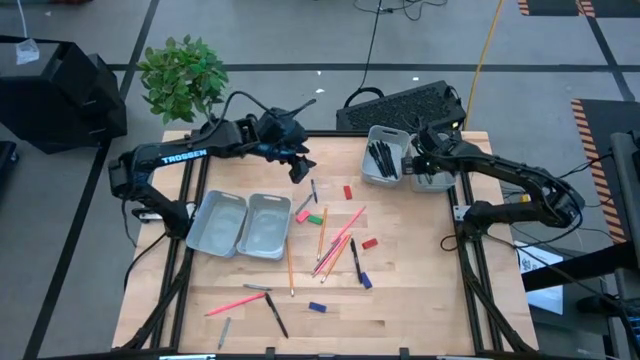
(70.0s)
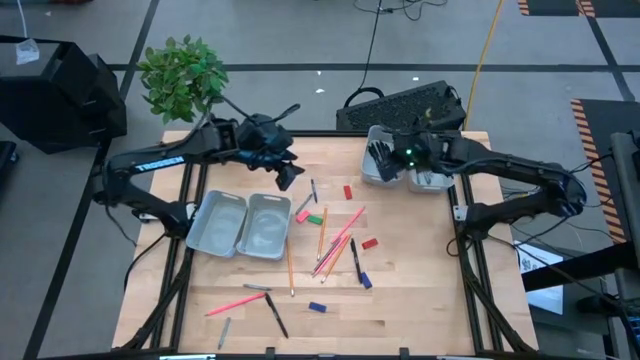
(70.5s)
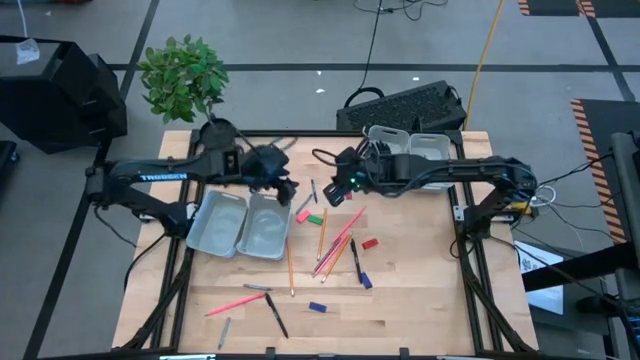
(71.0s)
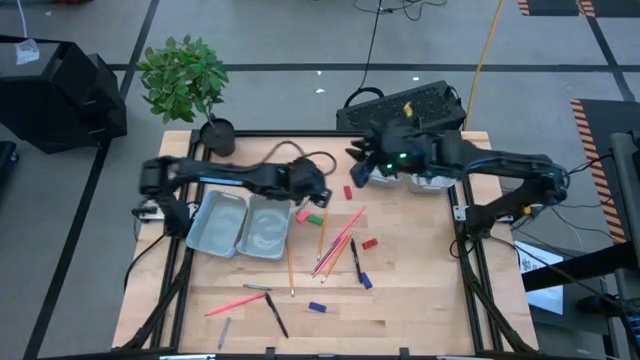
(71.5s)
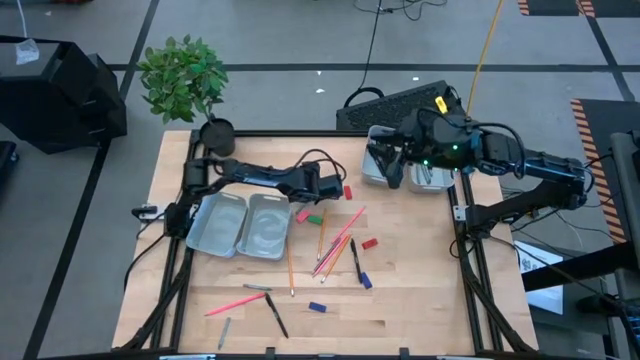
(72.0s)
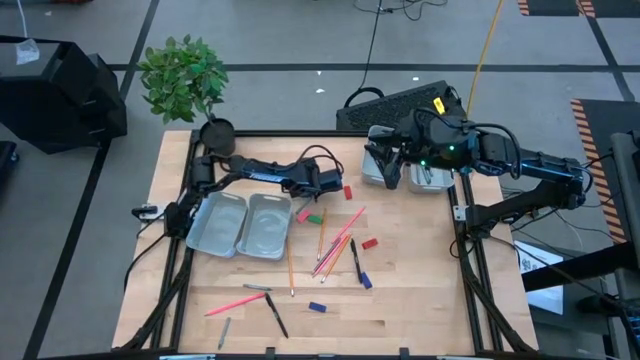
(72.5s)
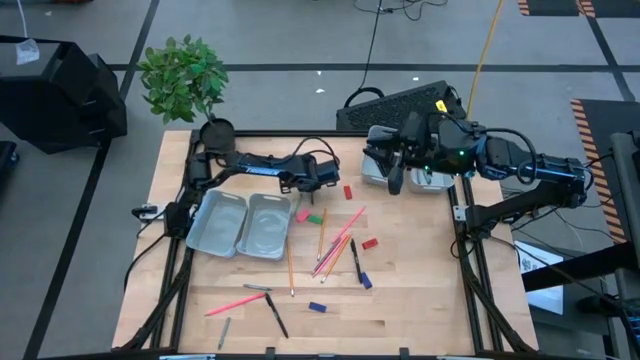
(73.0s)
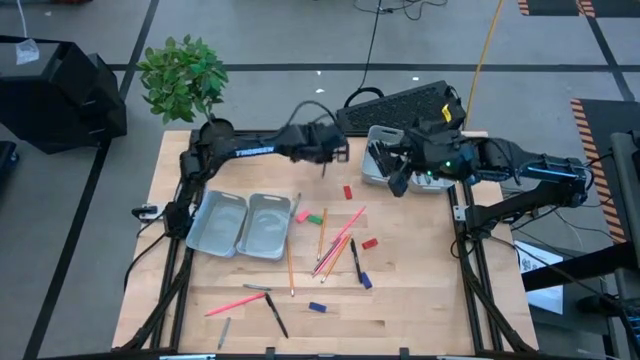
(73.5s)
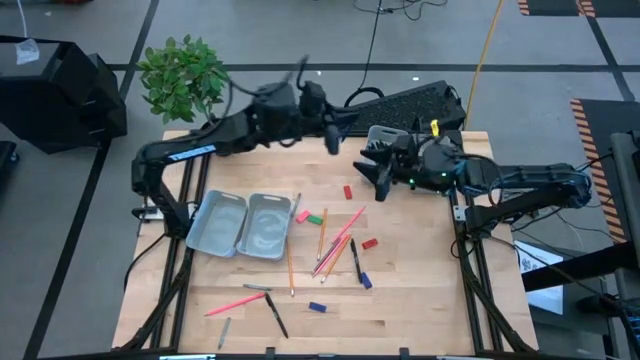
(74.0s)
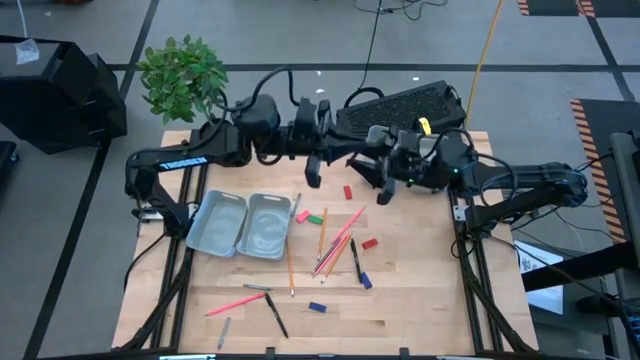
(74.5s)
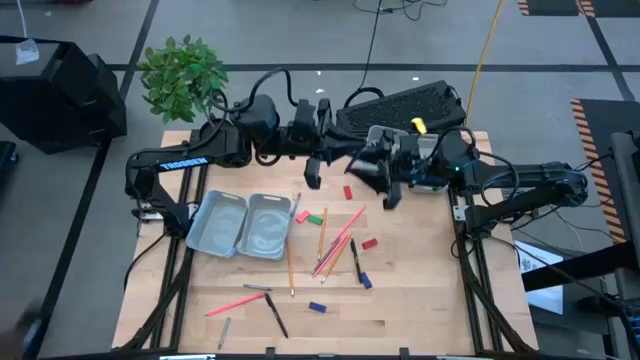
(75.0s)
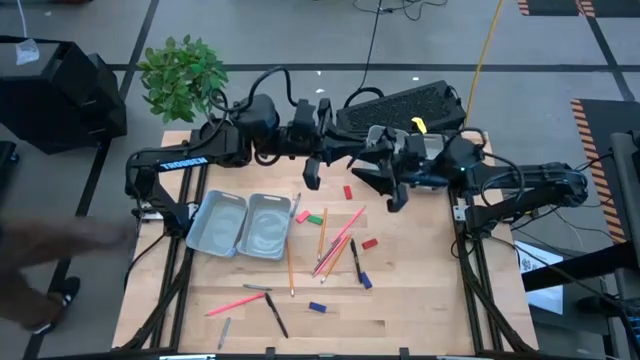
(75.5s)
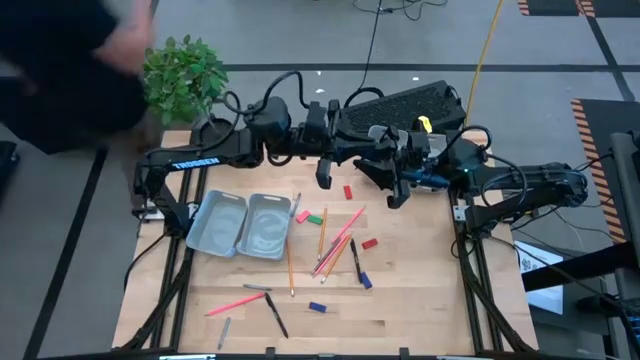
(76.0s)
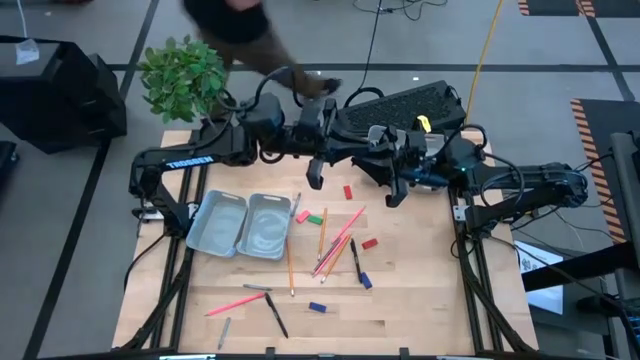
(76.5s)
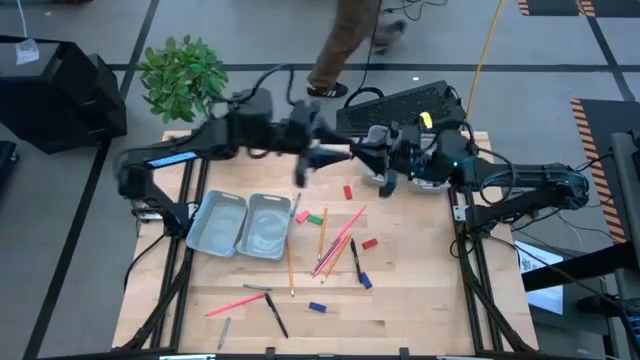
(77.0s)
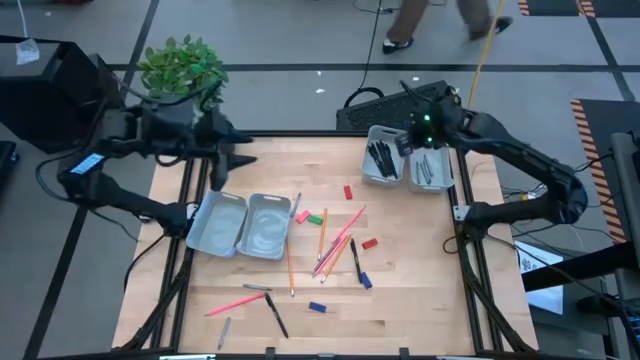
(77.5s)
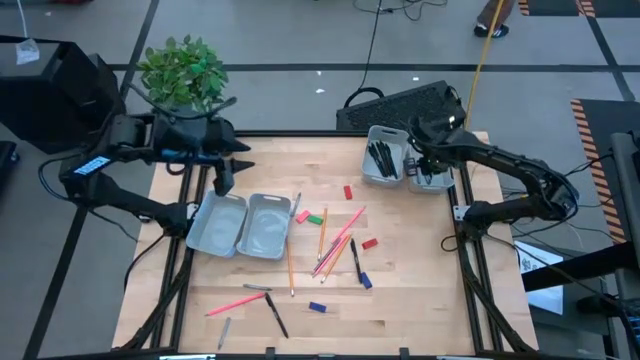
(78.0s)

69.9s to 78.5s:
Task: Sort crayons/erasers/pens/pencils in bins
Put the blue crayon into the top right gray bin

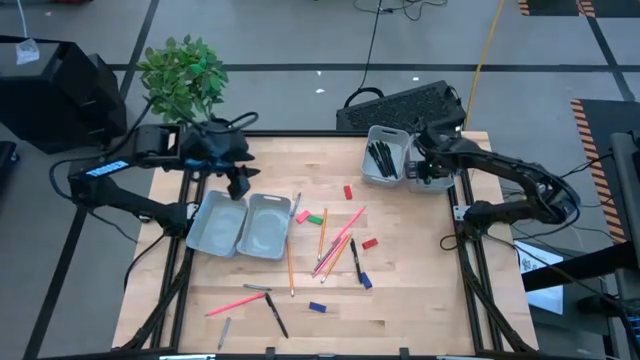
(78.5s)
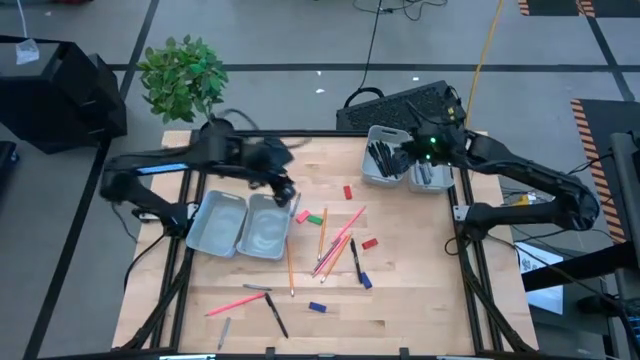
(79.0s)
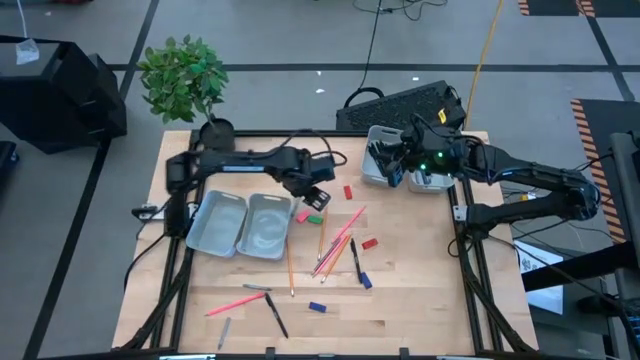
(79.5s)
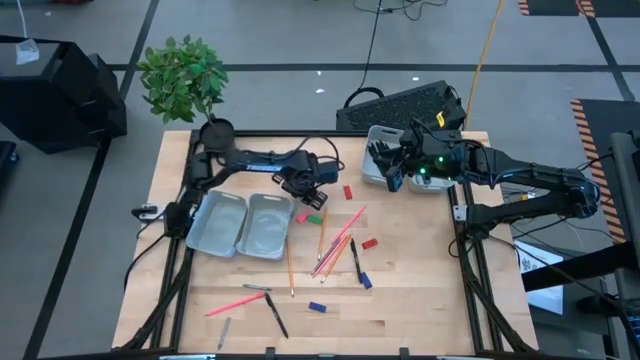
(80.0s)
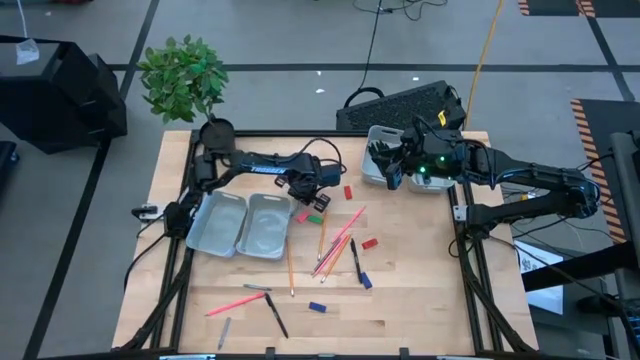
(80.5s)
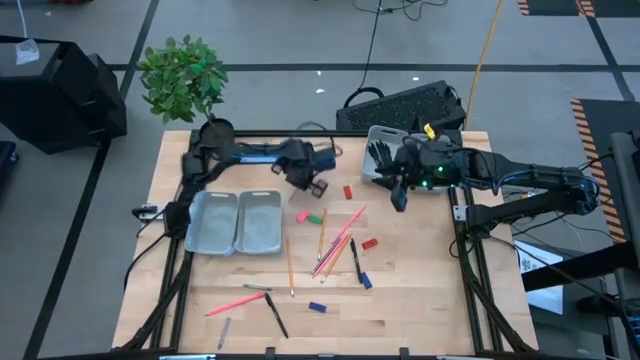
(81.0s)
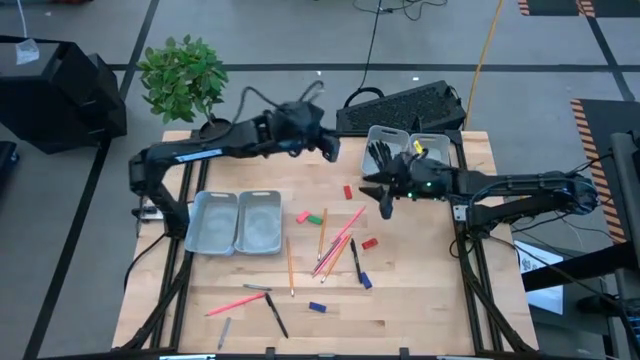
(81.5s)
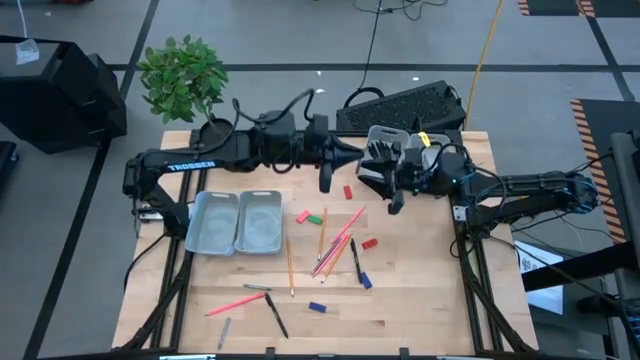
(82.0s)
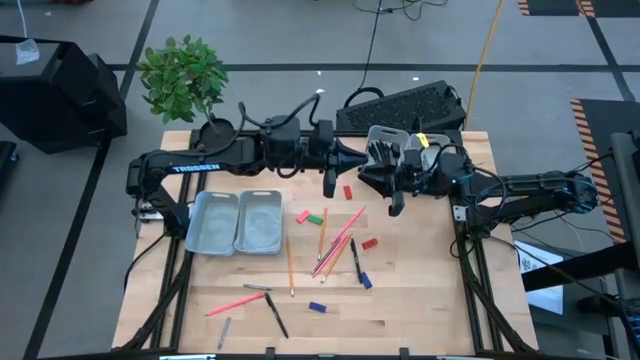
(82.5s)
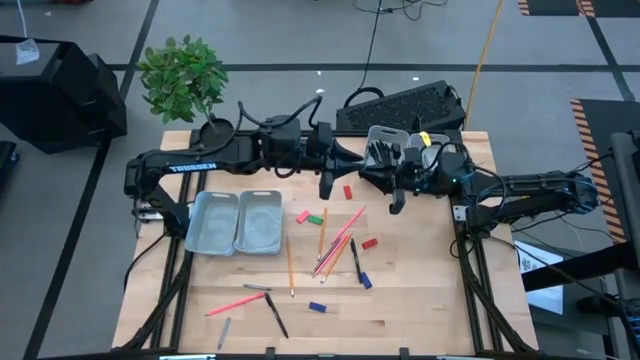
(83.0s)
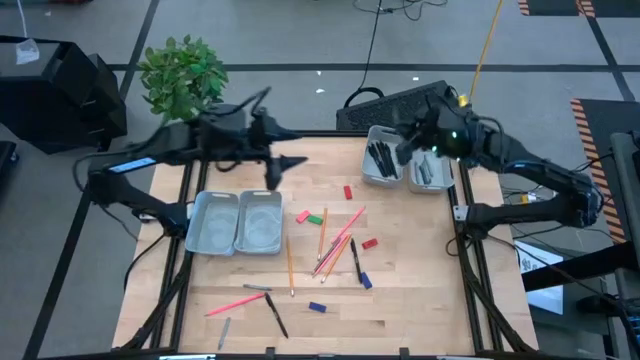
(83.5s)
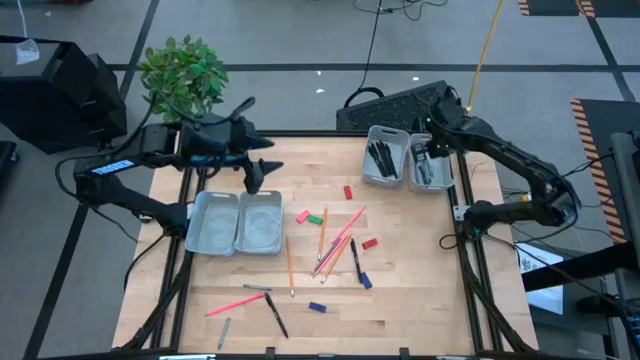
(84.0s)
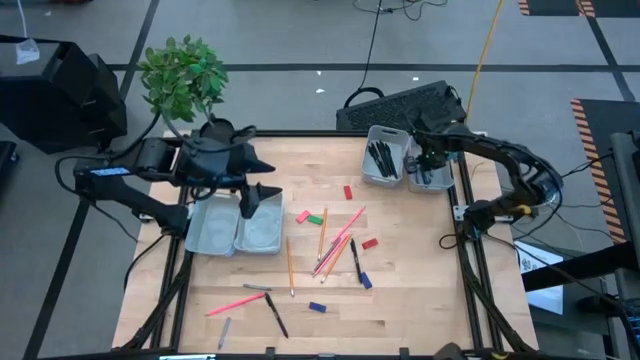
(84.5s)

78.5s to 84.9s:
Put the gray crayon into the top right gray bin

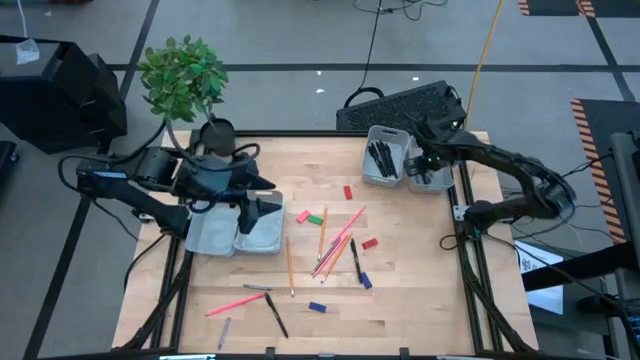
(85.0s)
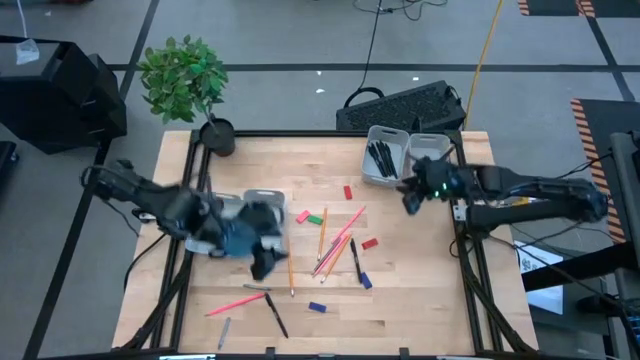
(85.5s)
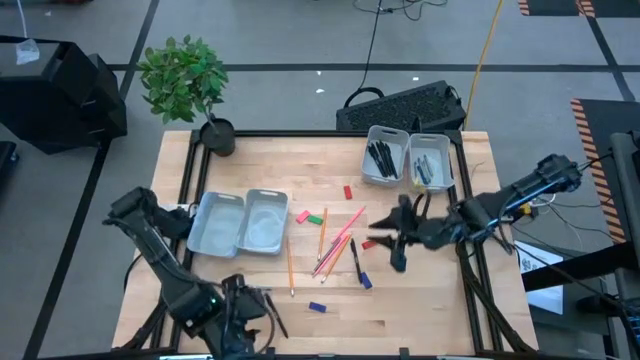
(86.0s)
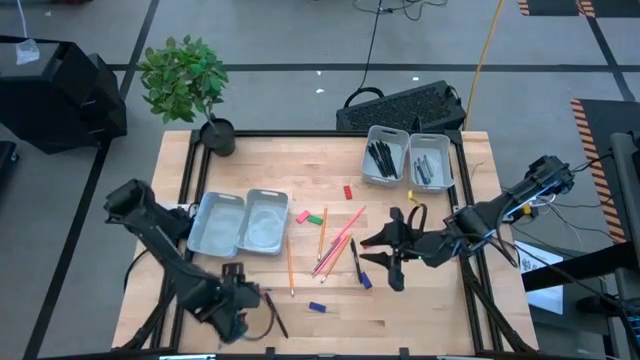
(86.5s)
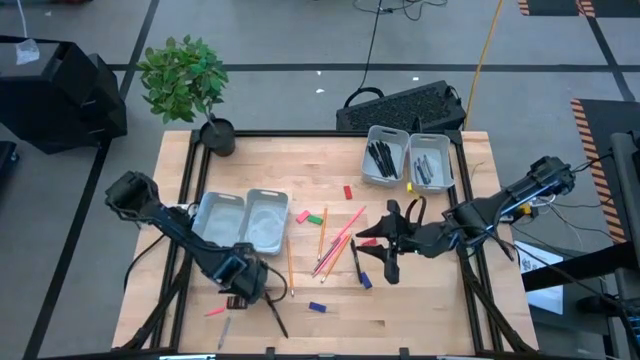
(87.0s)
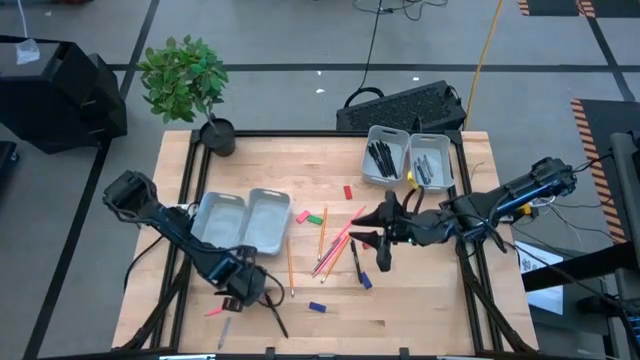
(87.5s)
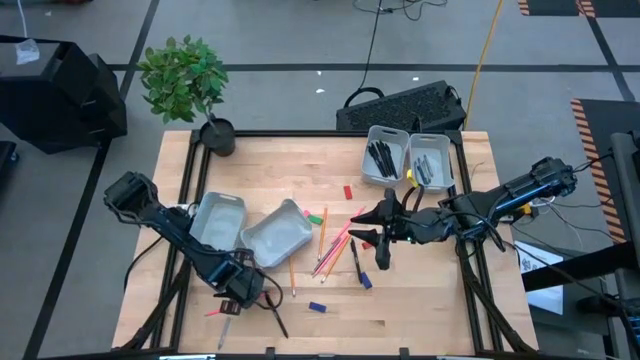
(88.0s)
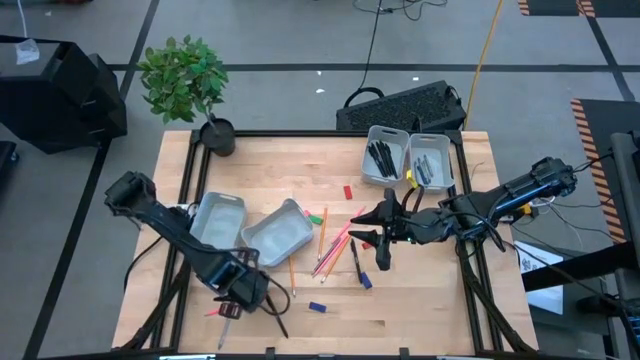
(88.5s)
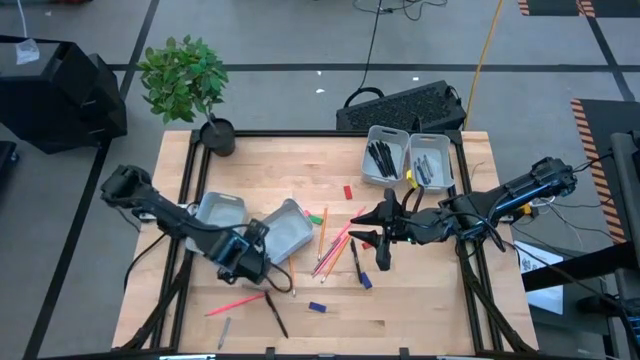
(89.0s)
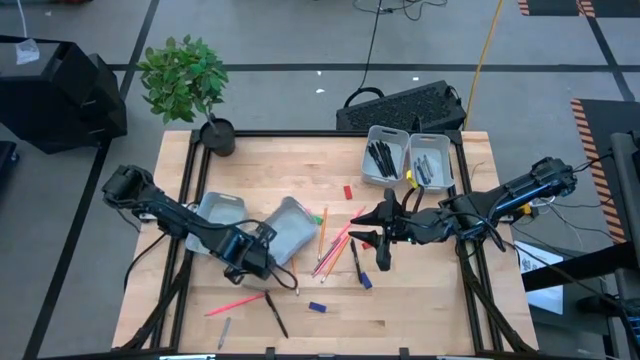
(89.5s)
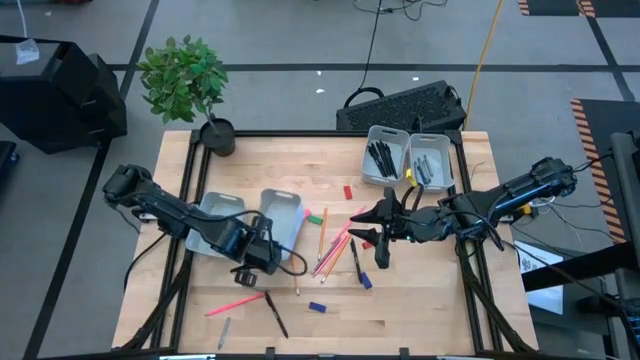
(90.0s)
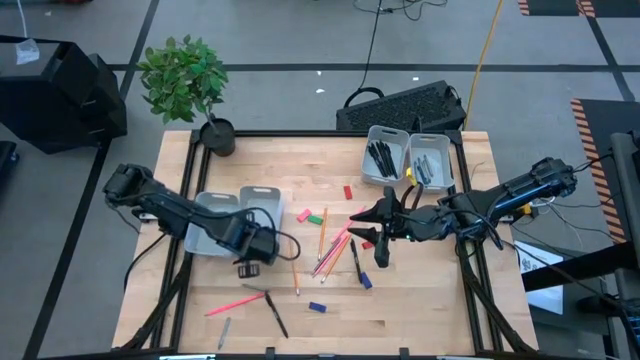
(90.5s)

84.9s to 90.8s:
Adjust the bottom right gray bin

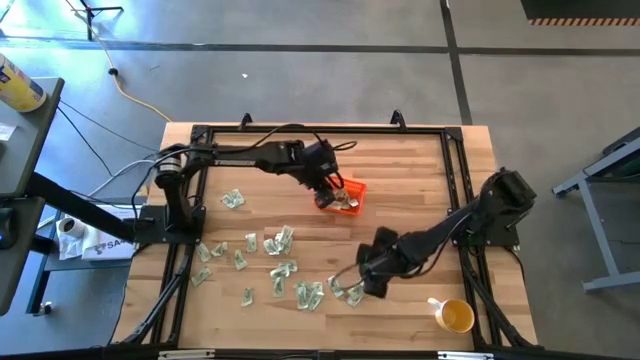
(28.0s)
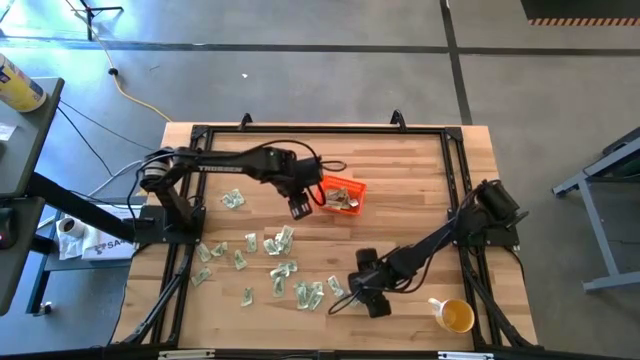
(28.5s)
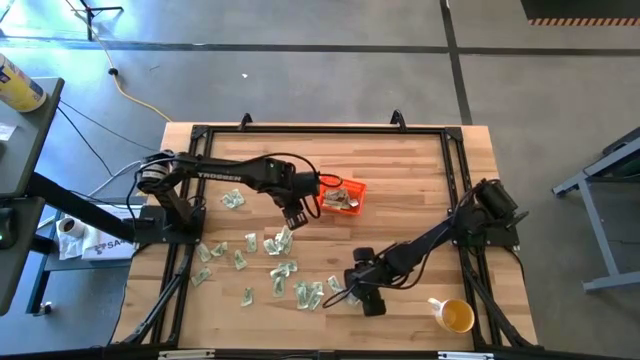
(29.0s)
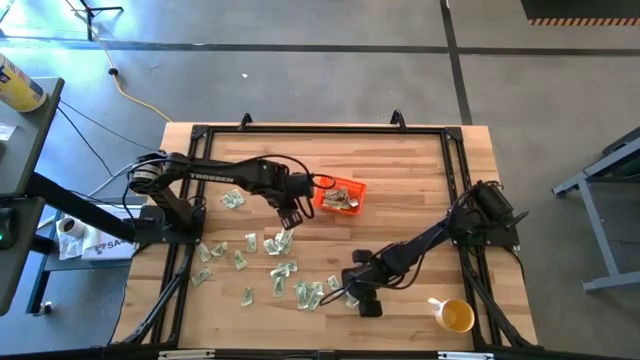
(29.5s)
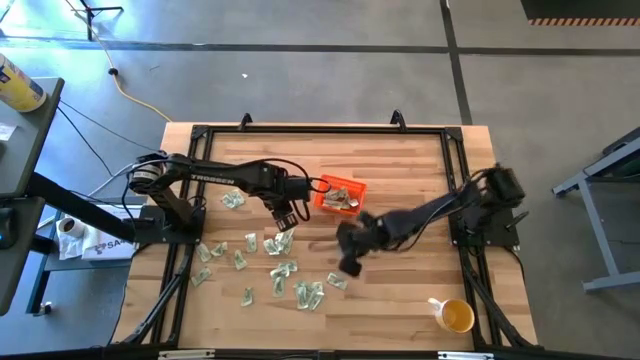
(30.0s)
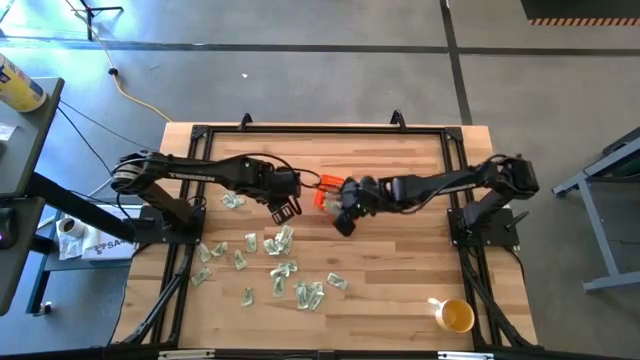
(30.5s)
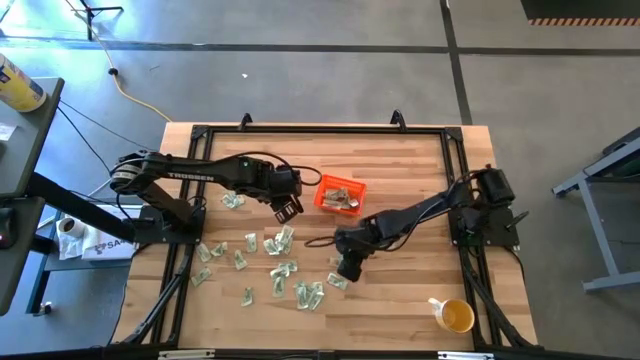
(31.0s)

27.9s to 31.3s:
Task: Pick and place Stevia / Truvia into bins
Put the green stevia packet into the orange basket
